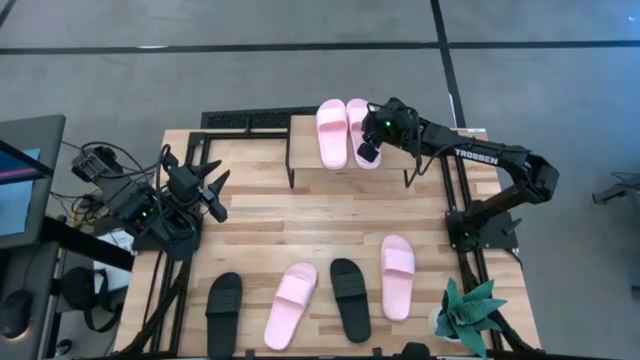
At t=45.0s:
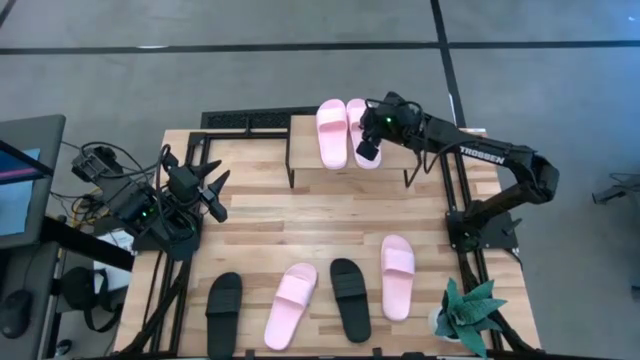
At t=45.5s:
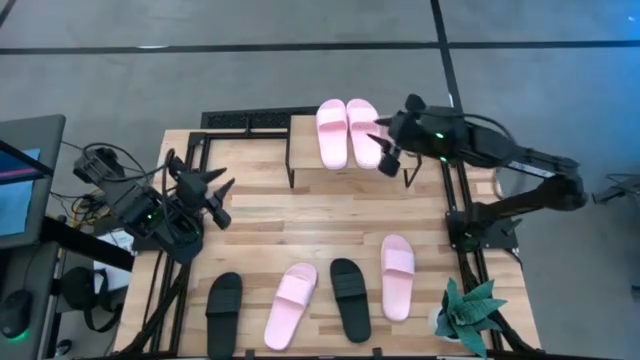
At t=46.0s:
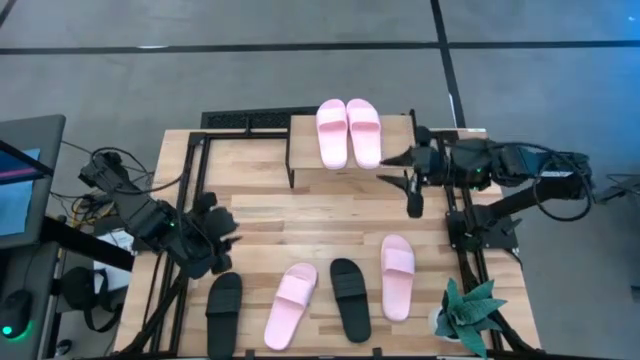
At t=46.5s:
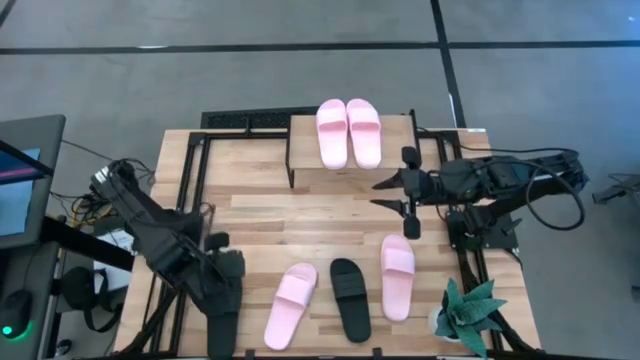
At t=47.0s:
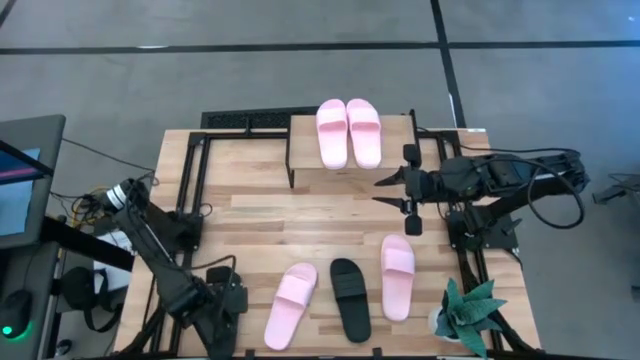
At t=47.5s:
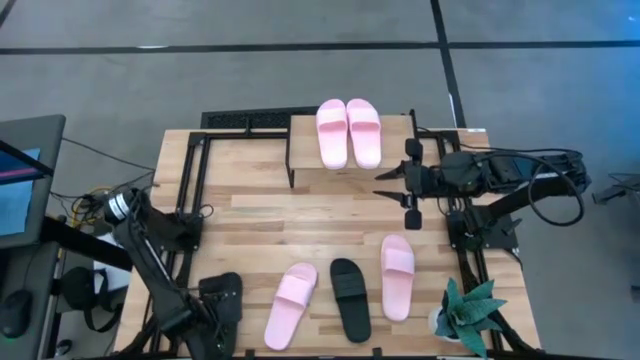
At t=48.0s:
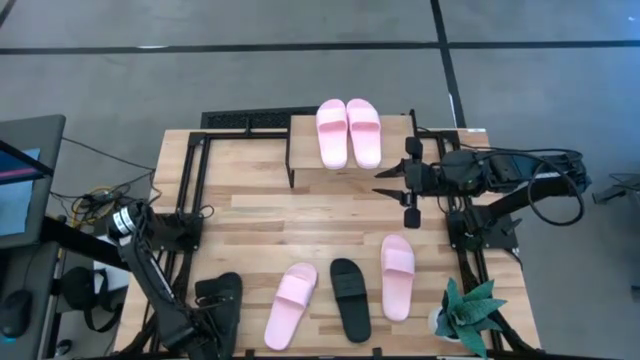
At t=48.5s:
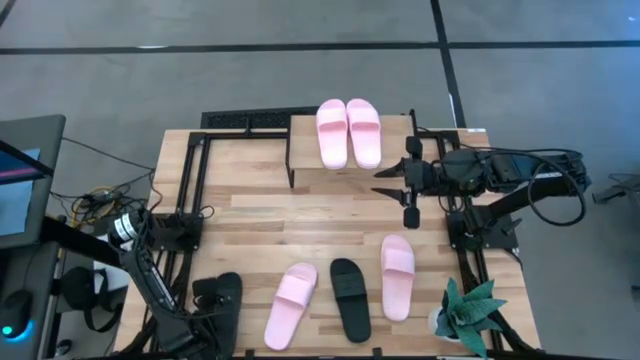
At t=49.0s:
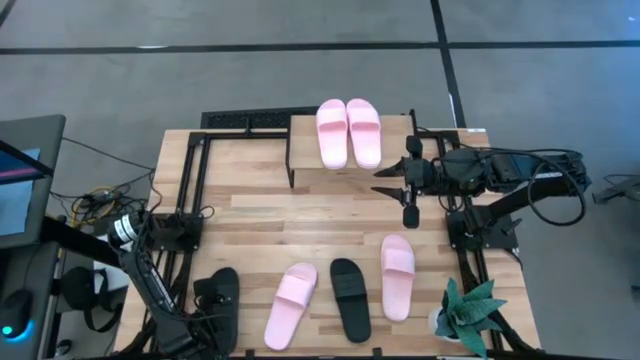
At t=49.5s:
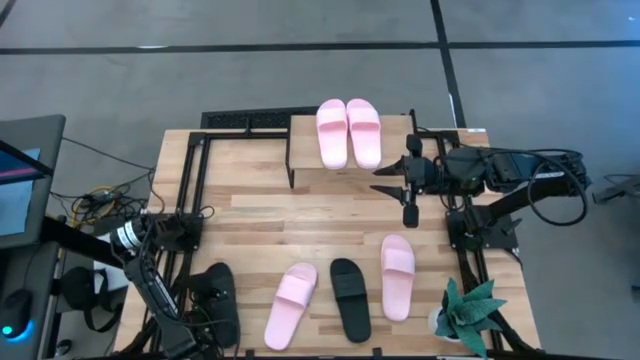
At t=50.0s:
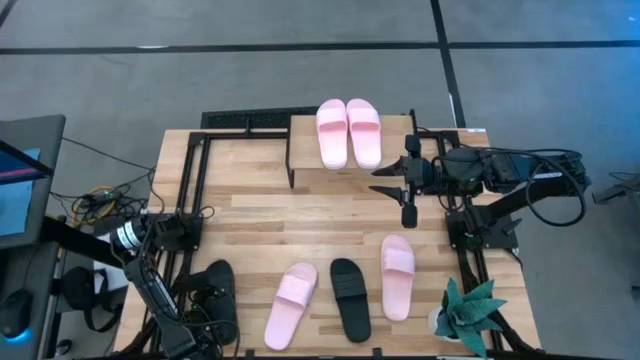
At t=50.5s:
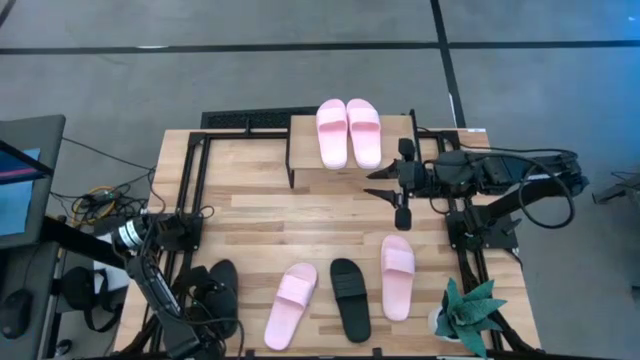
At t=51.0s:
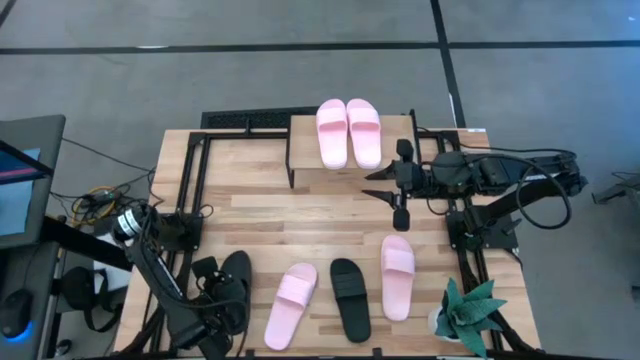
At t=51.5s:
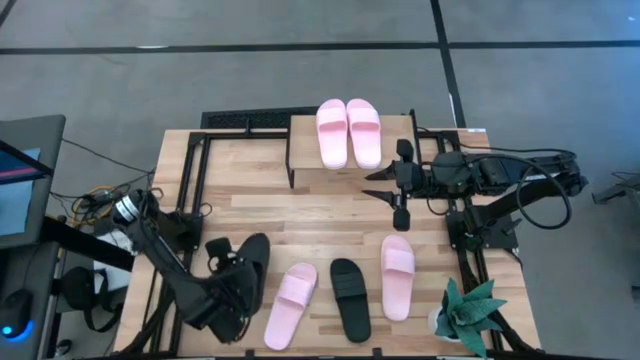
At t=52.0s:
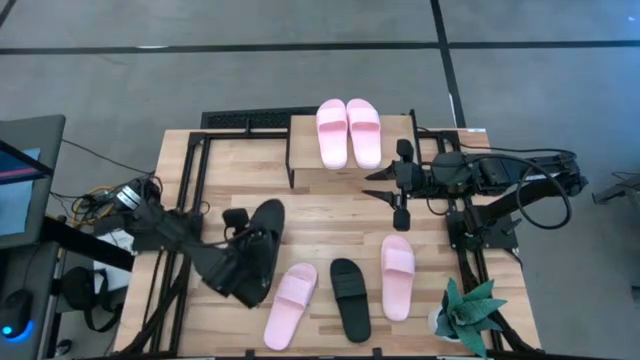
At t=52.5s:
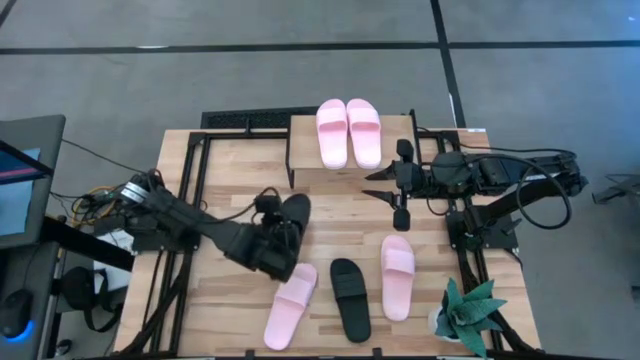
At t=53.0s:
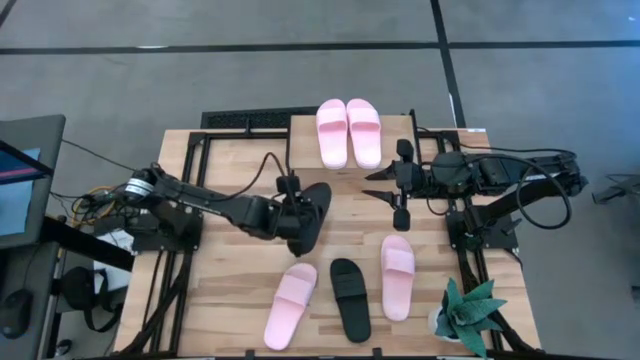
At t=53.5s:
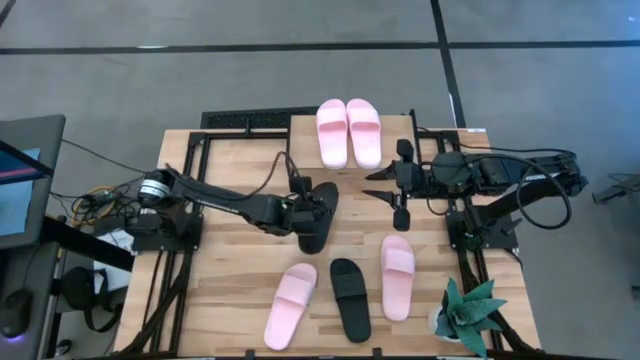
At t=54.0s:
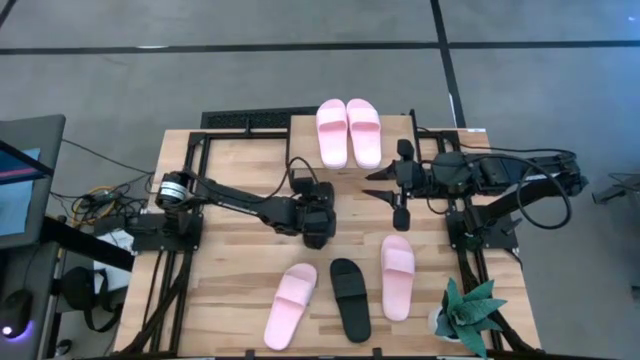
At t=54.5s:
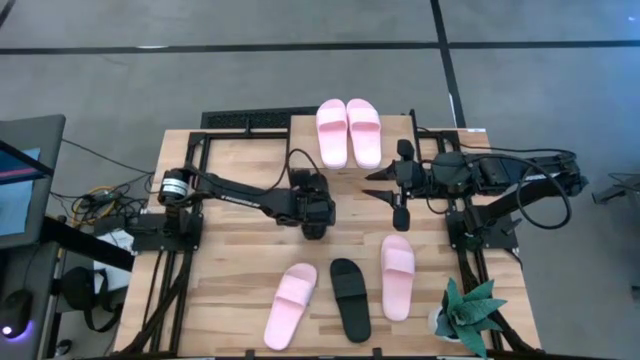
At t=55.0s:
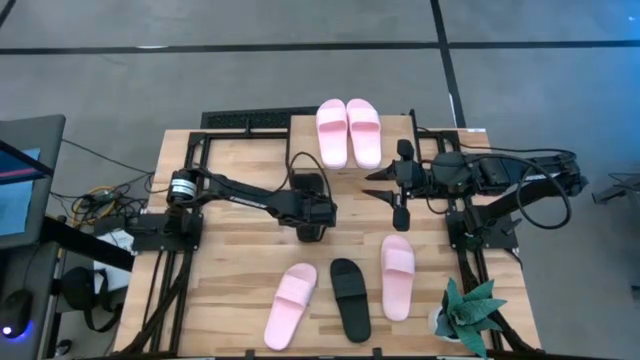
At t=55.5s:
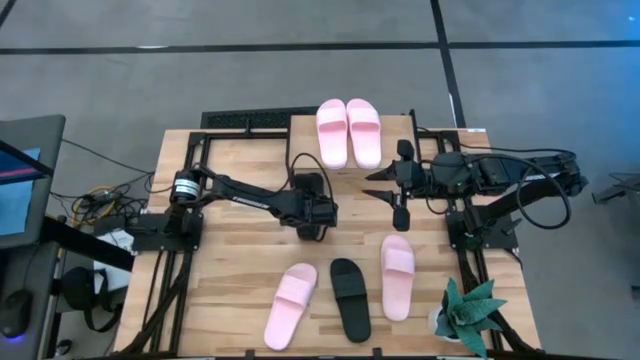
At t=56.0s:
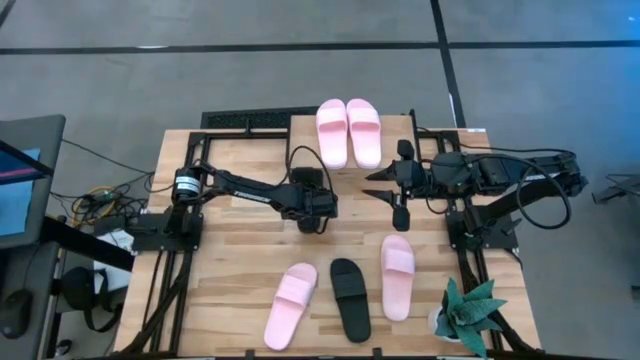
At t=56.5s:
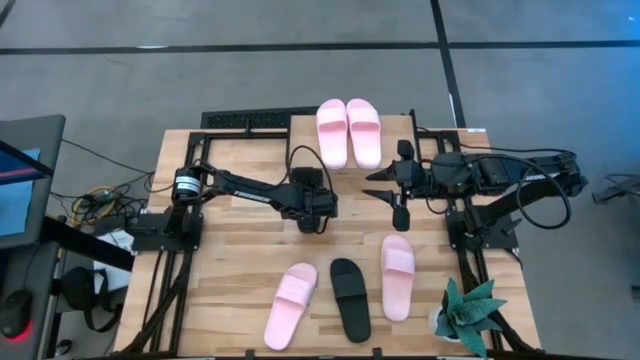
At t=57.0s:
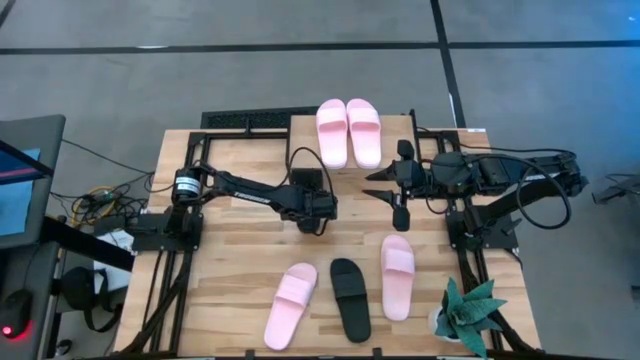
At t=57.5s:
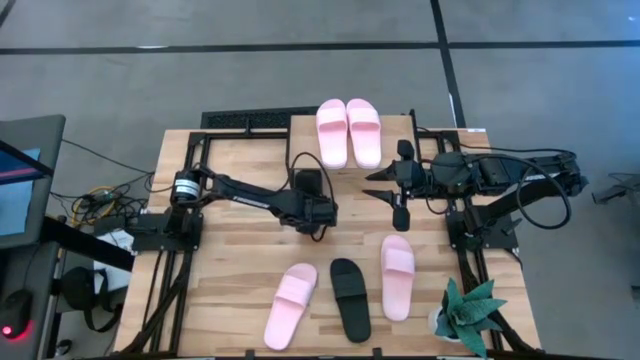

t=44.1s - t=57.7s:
Task: Pick and place slides into the shelf
Put the left black slide under the shelf

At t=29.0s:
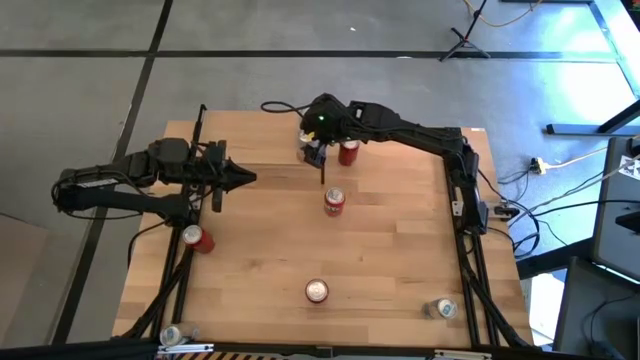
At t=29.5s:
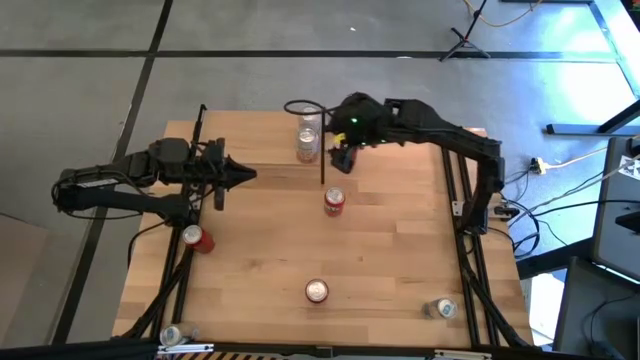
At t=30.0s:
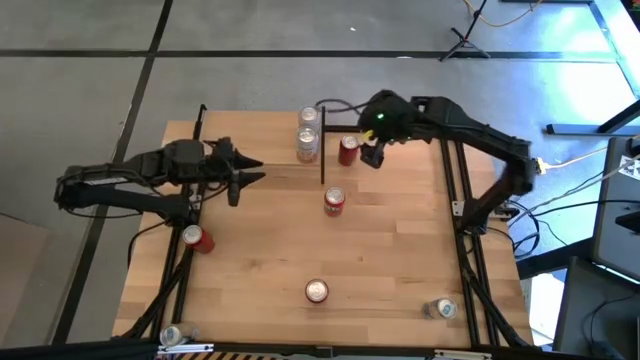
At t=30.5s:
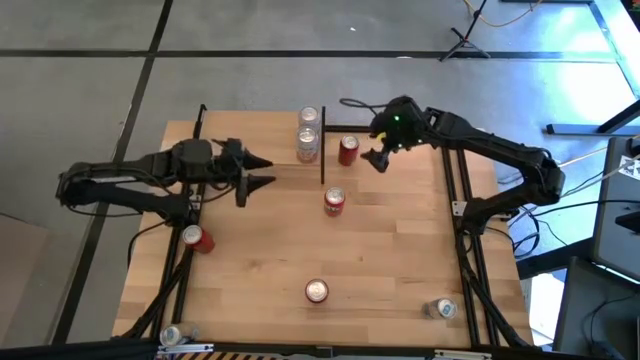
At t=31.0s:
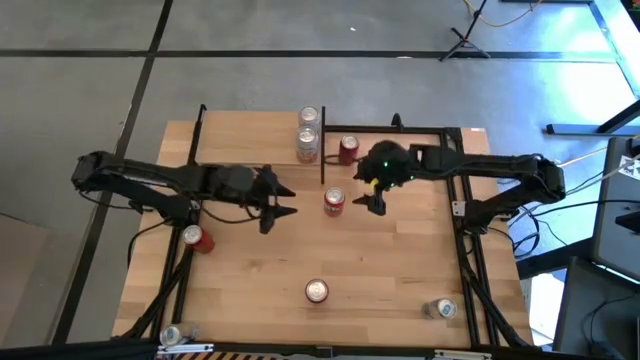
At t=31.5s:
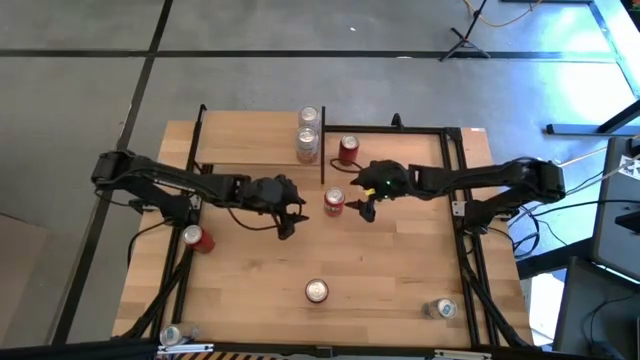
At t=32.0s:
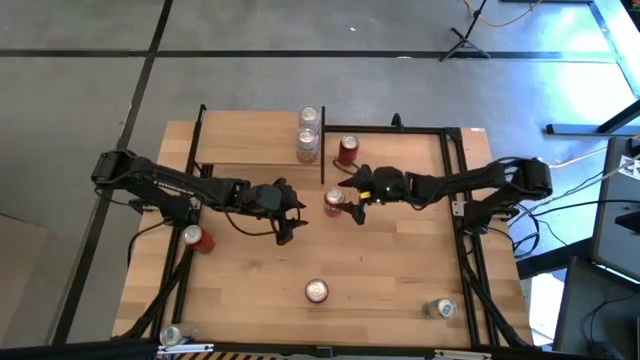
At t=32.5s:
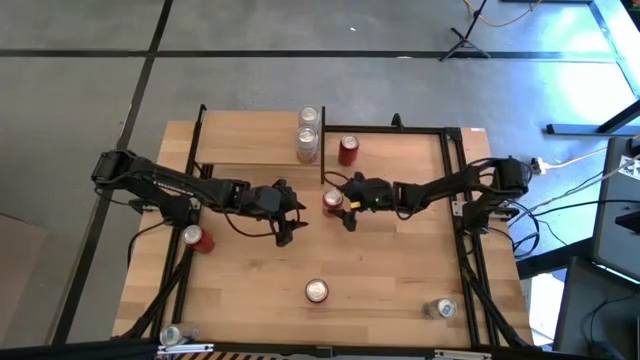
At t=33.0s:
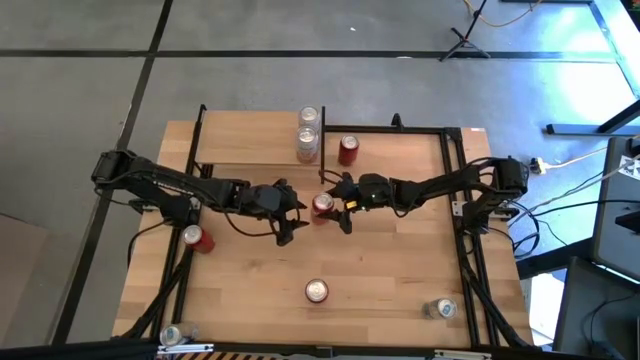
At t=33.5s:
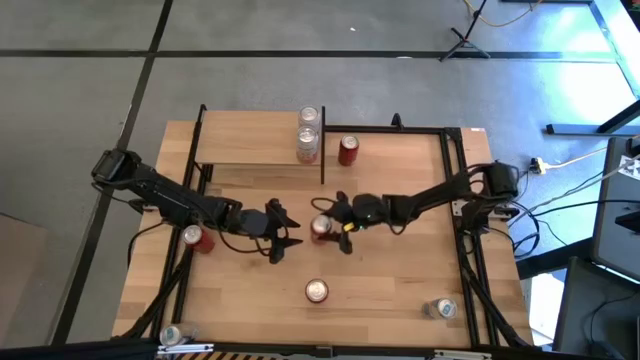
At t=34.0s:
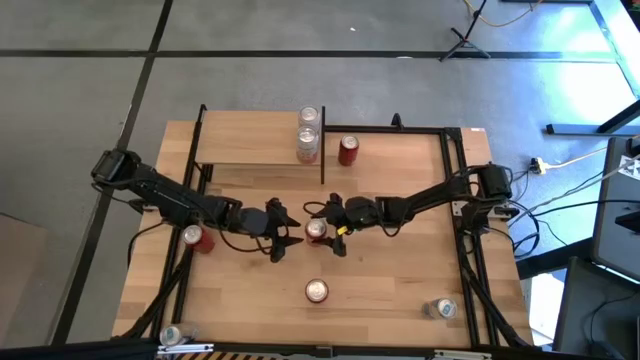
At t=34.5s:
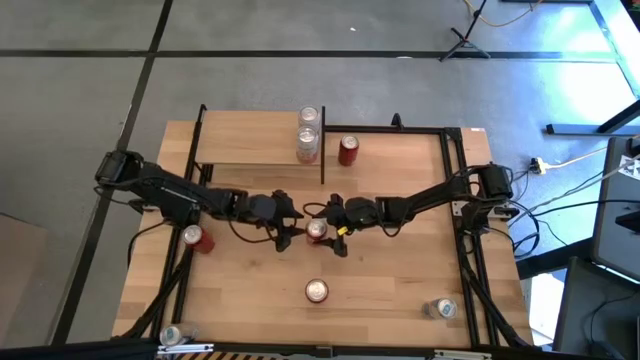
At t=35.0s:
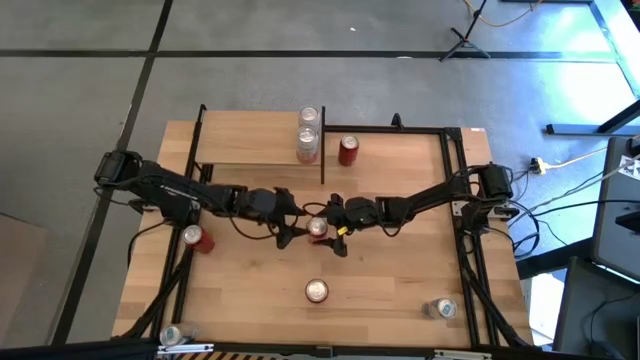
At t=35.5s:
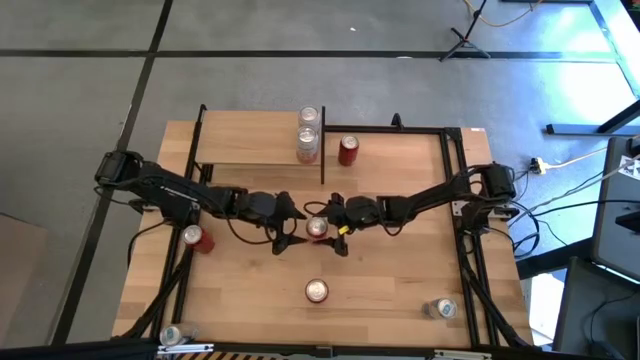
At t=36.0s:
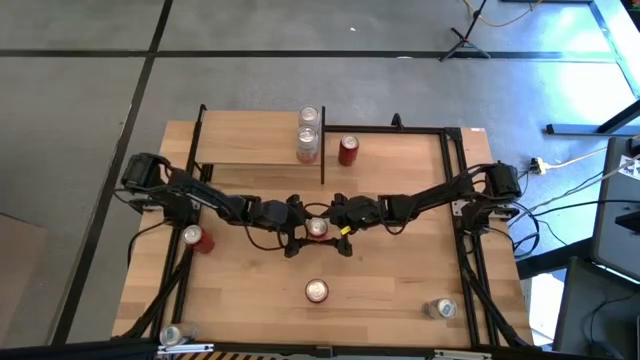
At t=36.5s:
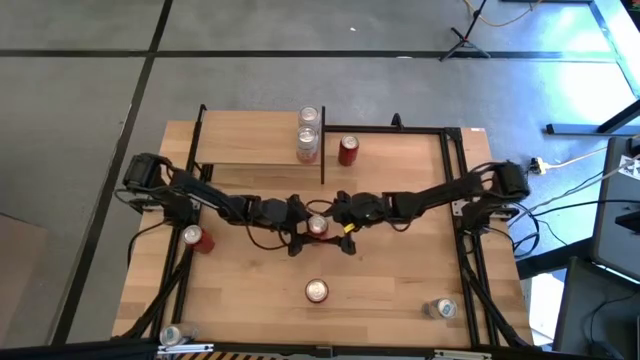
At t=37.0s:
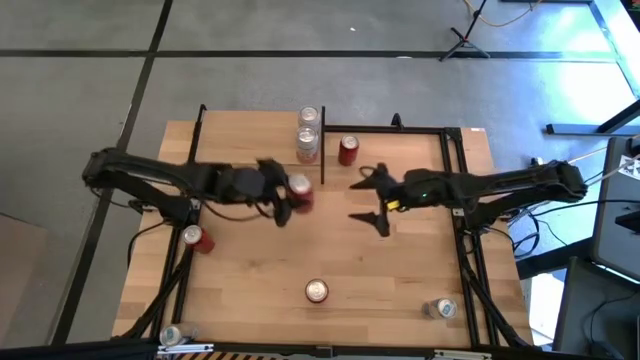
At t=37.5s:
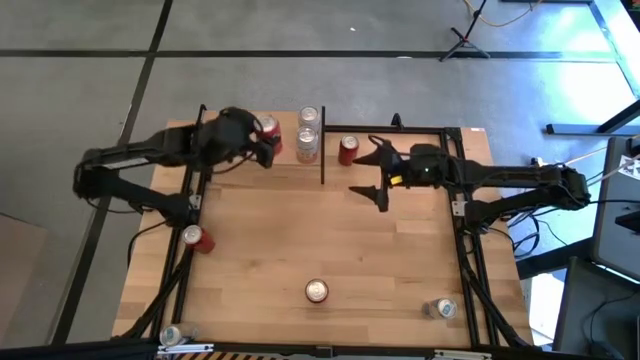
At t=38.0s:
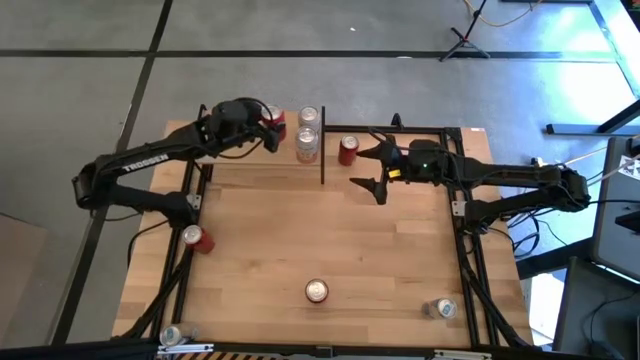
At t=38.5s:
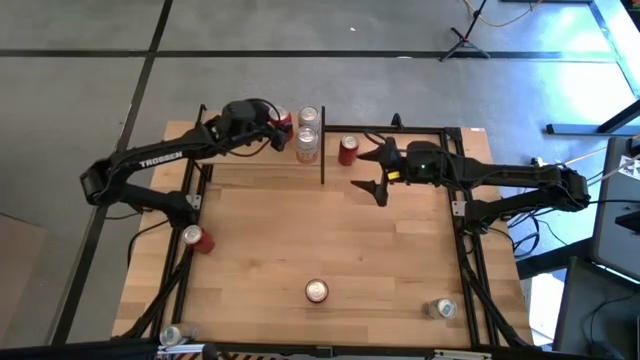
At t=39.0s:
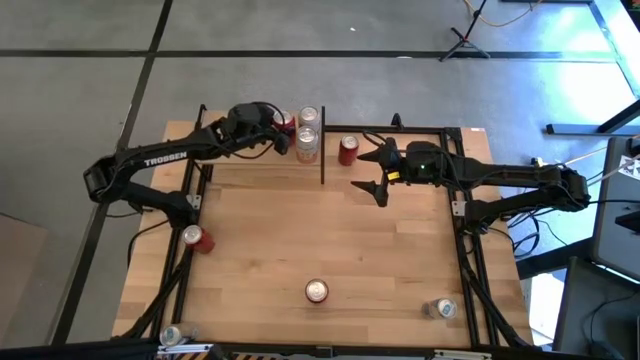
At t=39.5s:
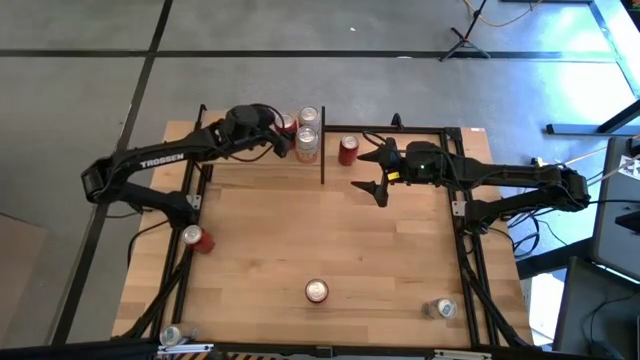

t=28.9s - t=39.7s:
Task: Place canned beverage on shelf
Put the top orange soda can on the shelf
